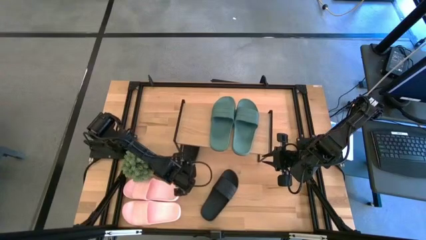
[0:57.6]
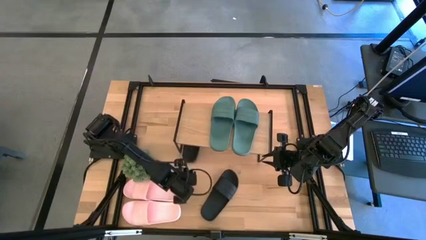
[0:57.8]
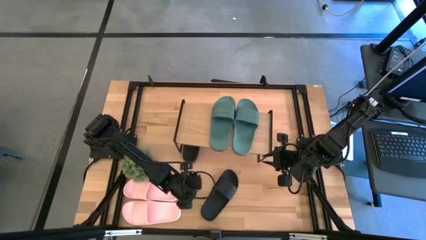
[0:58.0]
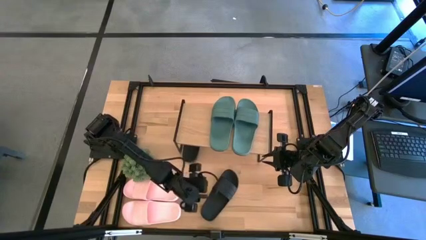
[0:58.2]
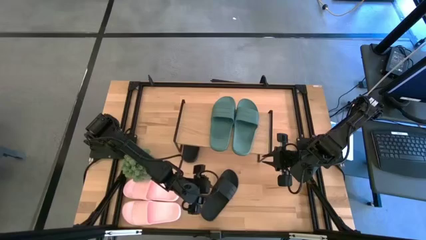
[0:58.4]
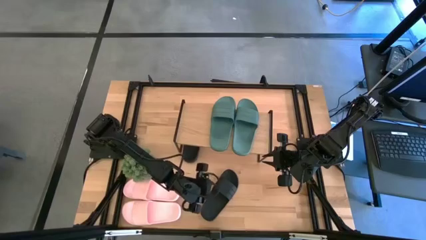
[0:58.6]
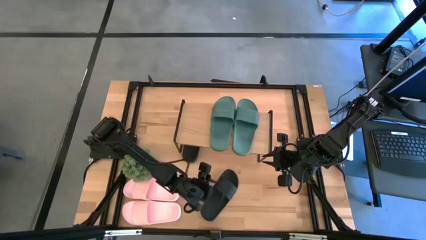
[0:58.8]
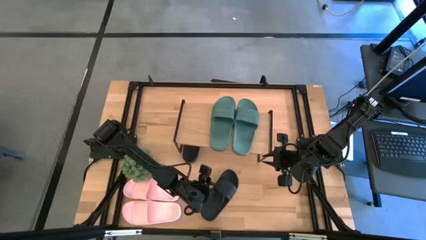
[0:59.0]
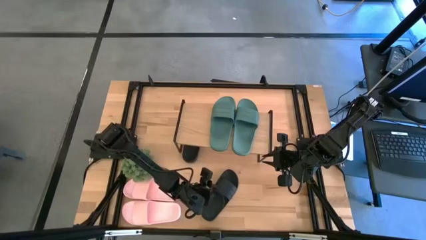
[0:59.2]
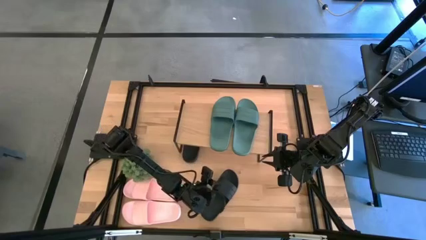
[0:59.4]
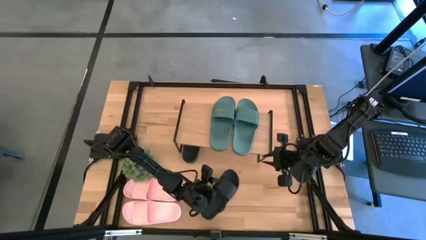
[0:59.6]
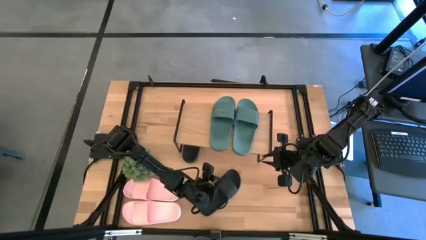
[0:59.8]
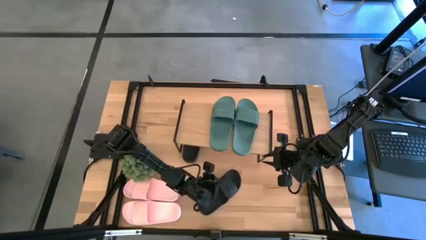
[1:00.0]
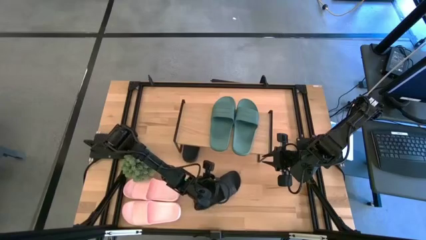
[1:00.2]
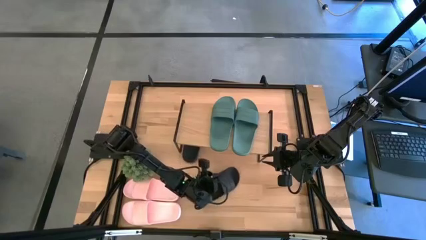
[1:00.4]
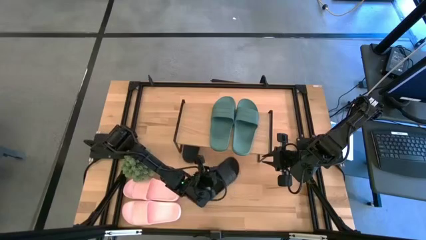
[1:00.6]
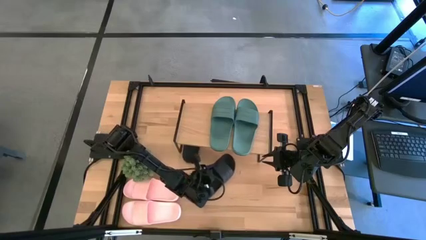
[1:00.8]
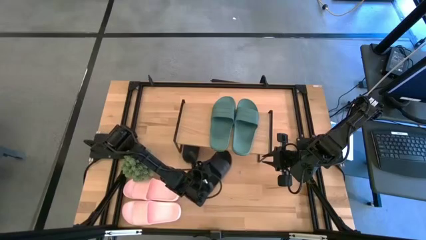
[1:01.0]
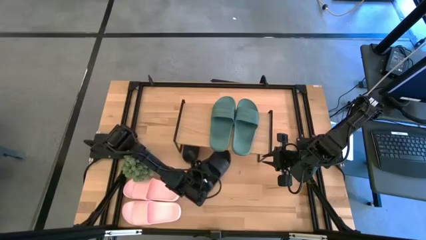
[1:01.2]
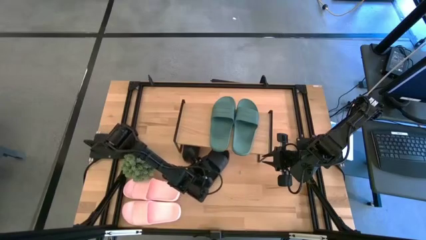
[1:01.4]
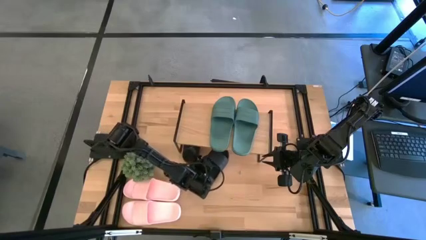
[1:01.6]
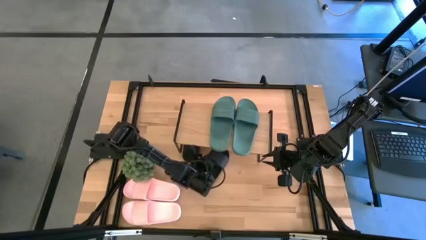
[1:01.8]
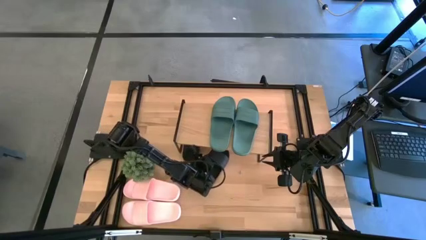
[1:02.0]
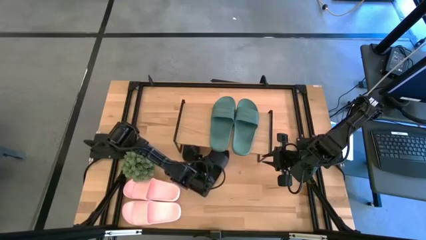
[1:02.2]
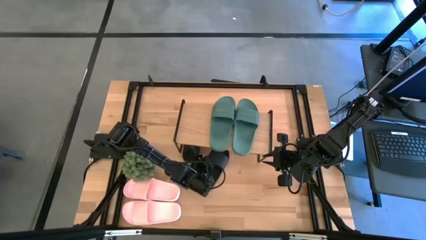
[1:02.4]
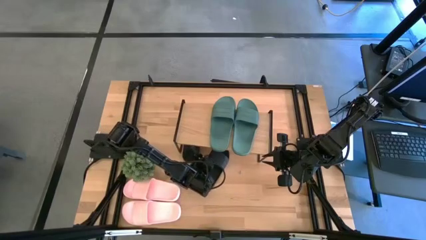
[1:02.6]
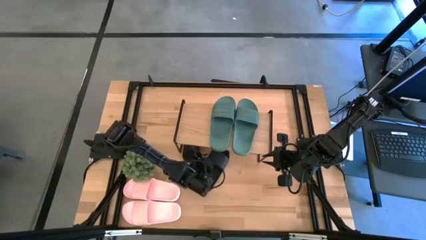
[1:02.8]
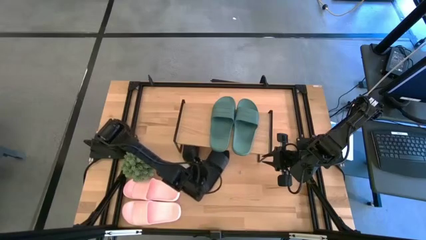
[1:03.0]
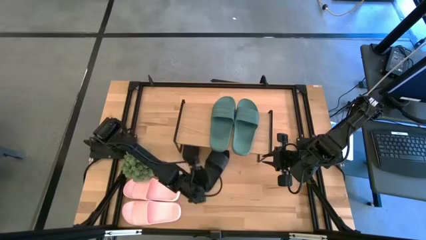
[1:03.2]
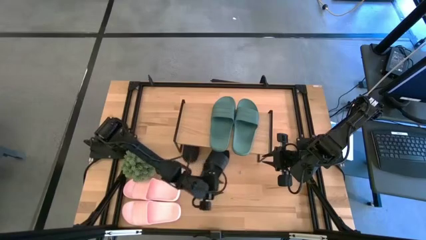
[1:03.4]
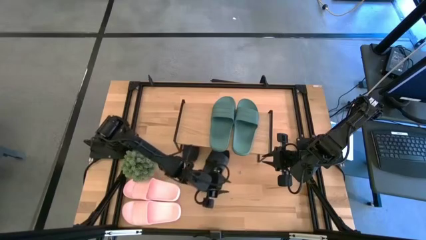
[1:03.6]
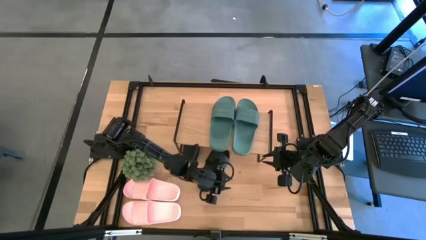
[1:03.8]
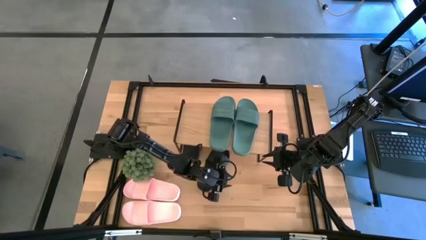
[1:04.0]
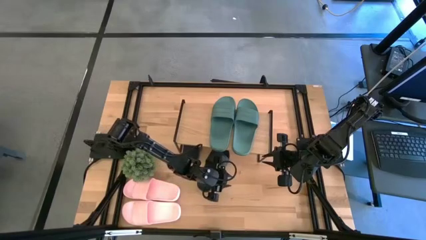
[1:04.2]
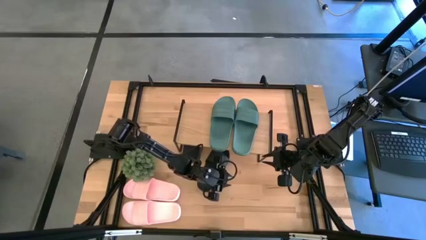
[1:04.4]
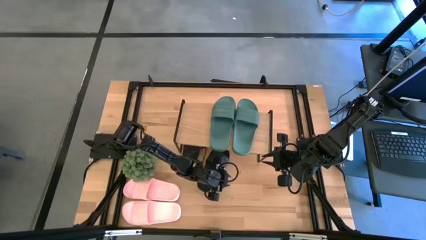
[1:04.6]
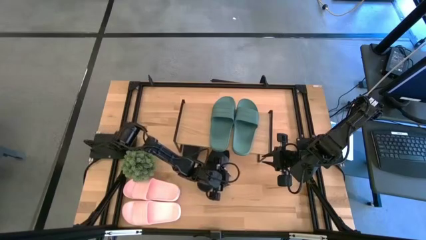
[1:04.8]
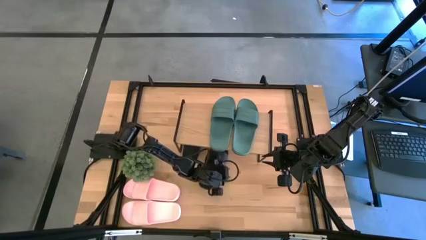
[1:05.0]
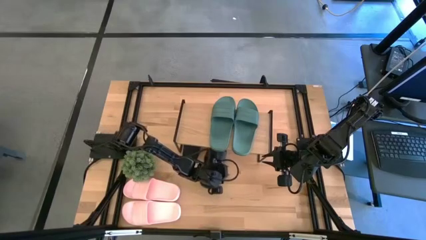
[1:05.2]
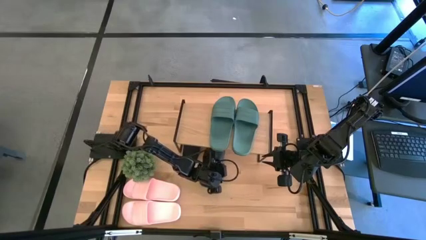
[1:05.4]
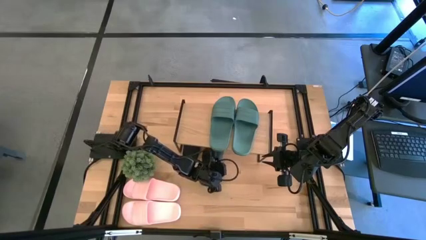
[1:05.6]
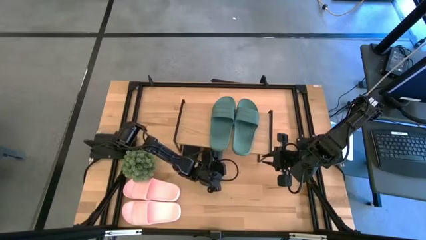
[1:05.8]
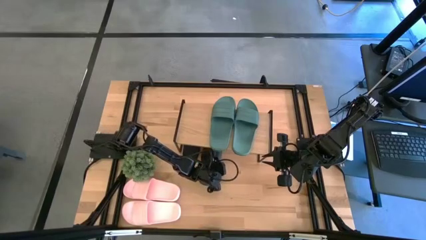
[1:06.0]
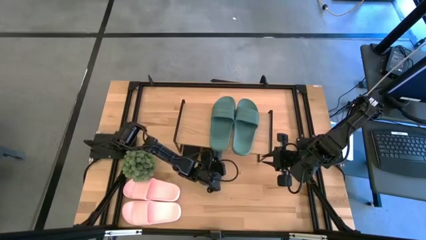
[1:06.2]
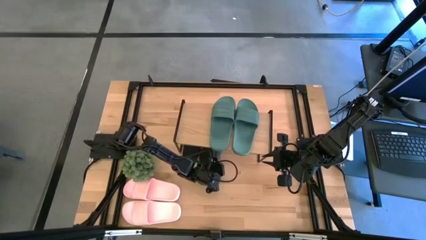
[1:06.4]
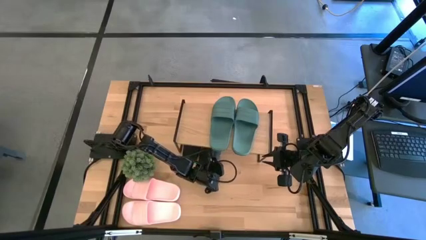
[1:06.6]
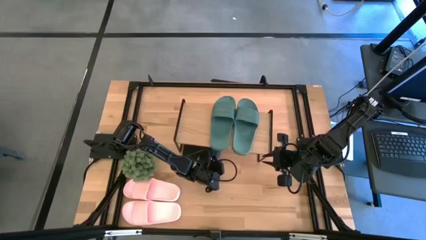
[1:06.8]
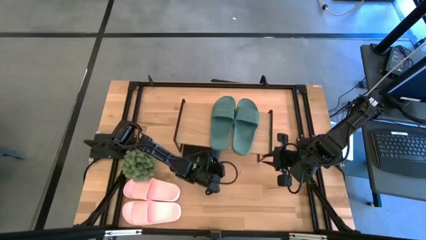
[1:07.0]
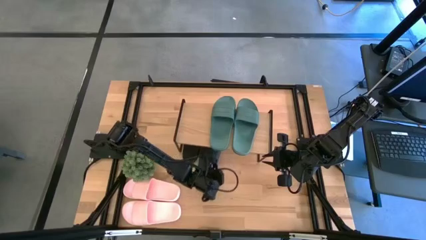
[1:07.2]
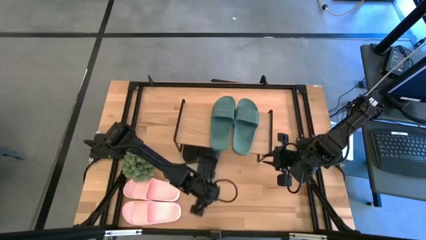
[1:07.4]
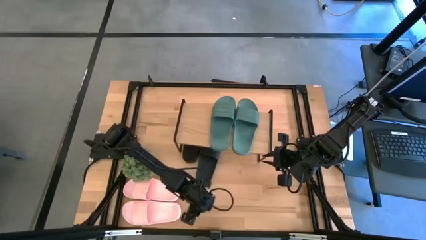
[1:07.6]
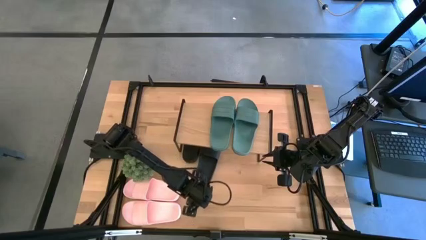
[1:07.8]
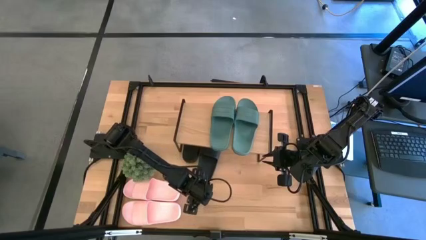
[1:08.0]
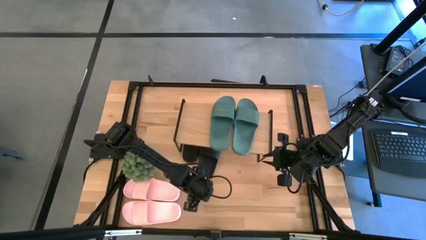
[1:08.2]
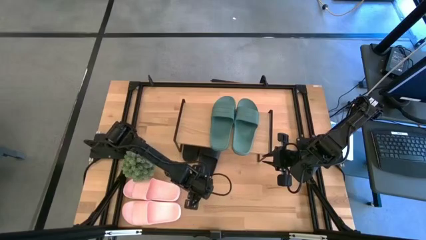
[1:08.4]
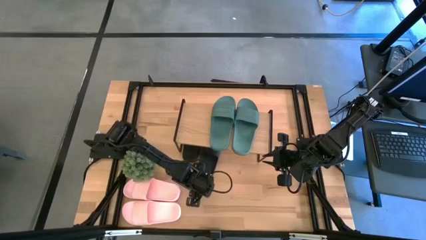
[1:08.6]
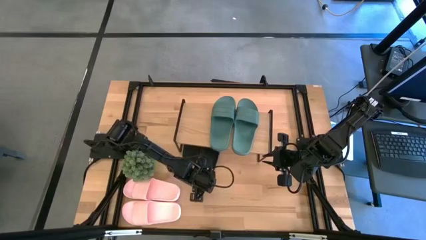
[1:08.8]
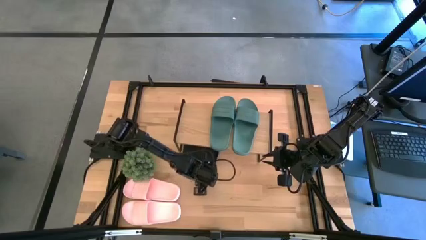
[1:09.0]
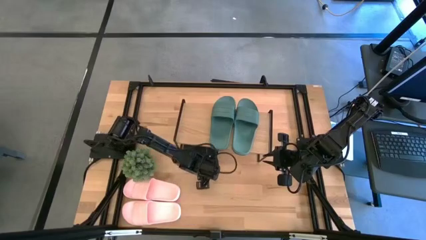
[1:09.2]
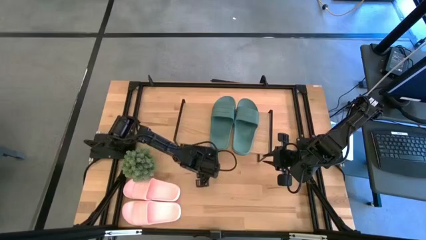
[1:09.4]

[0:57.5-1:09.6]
Task: Pick and place slides into the shelf
Put the black slipper under the shelf

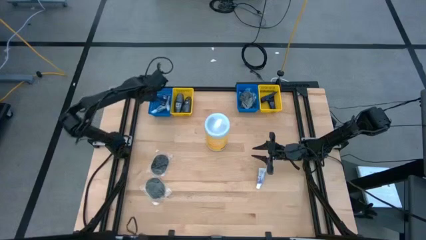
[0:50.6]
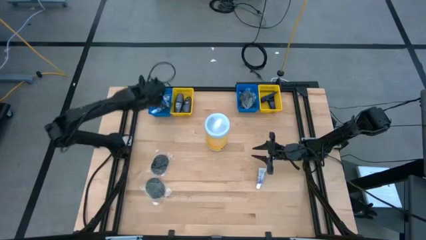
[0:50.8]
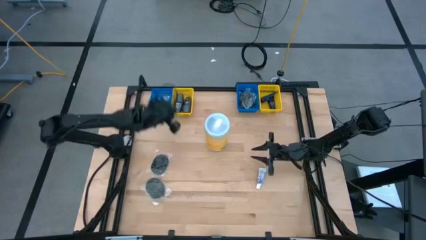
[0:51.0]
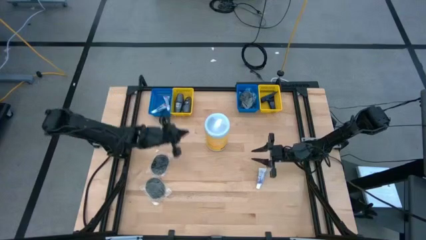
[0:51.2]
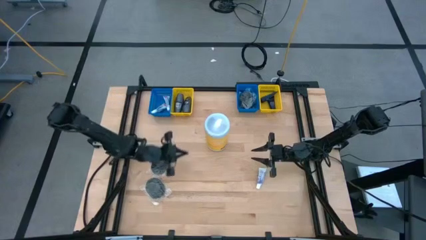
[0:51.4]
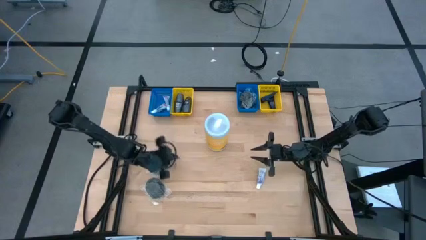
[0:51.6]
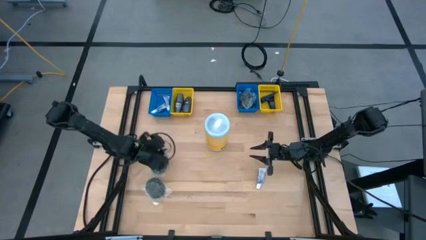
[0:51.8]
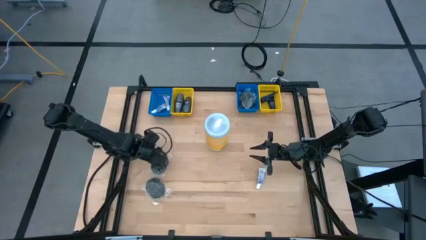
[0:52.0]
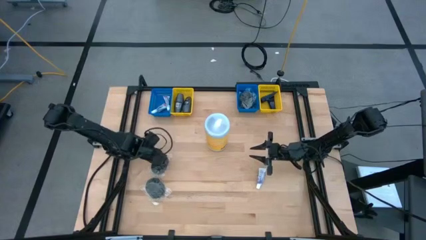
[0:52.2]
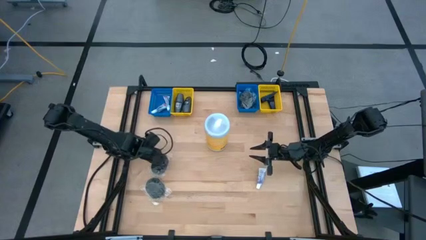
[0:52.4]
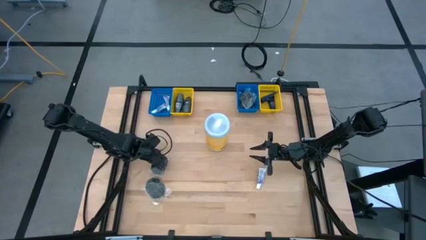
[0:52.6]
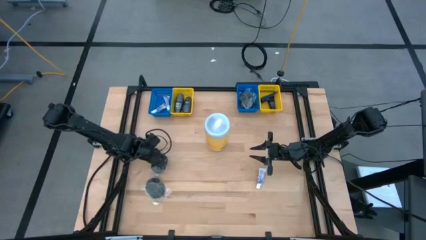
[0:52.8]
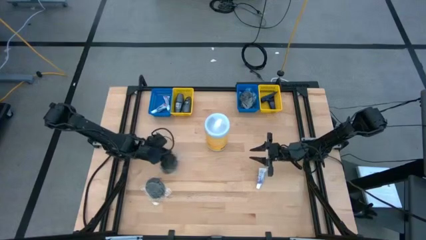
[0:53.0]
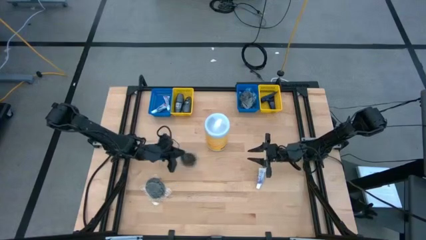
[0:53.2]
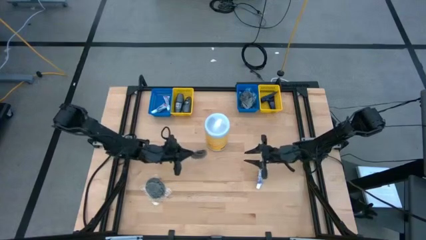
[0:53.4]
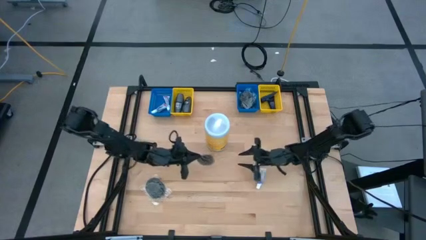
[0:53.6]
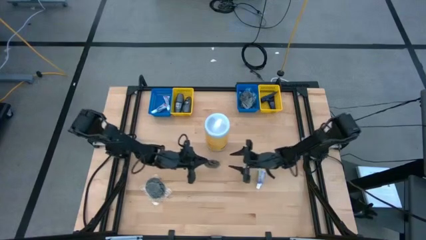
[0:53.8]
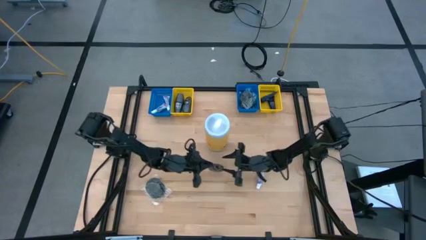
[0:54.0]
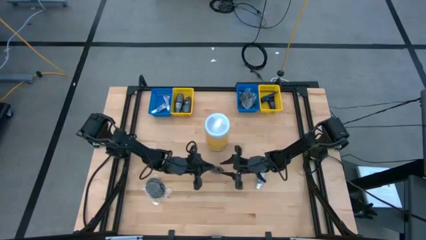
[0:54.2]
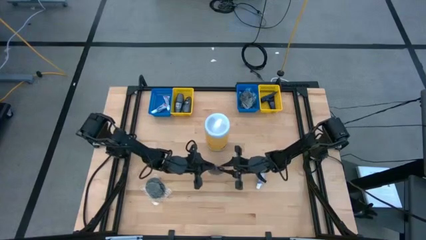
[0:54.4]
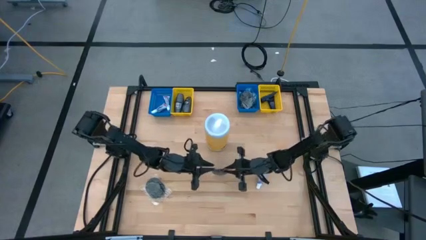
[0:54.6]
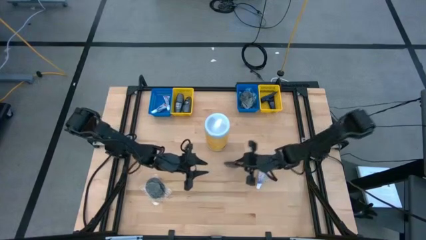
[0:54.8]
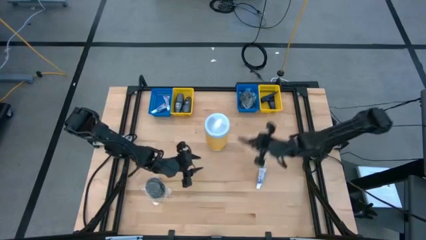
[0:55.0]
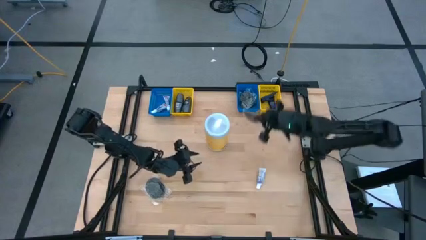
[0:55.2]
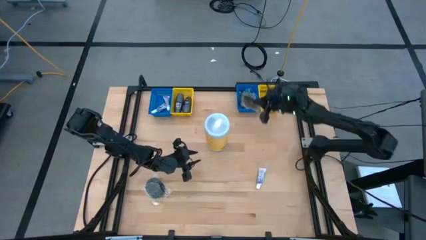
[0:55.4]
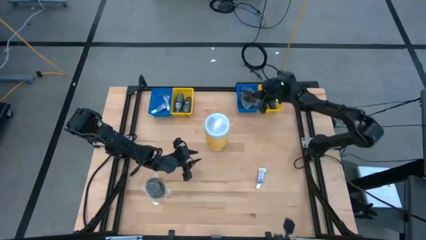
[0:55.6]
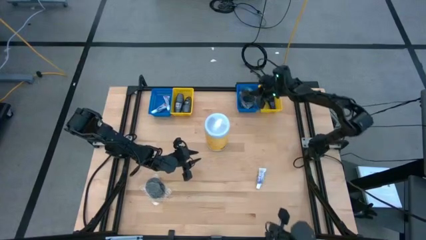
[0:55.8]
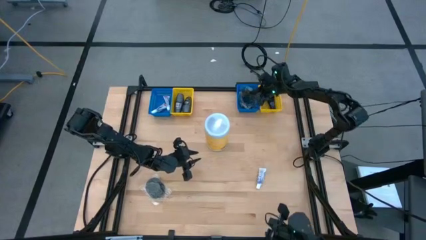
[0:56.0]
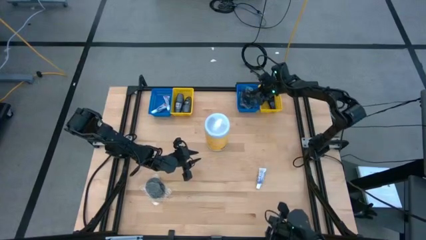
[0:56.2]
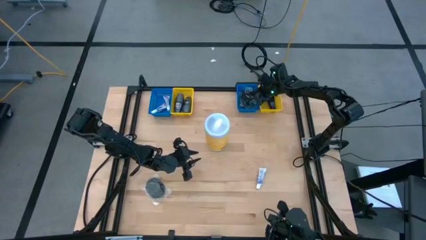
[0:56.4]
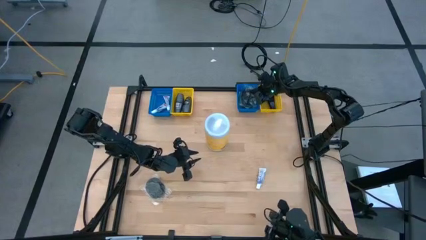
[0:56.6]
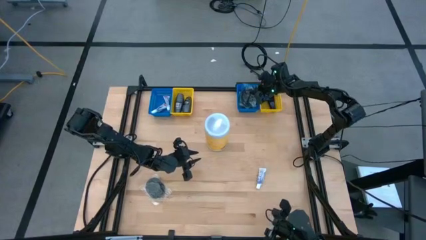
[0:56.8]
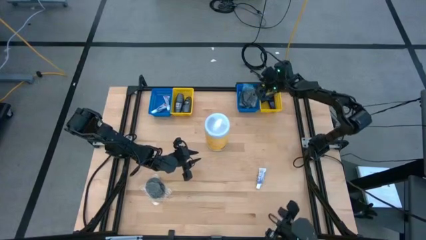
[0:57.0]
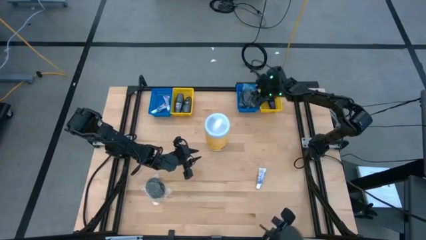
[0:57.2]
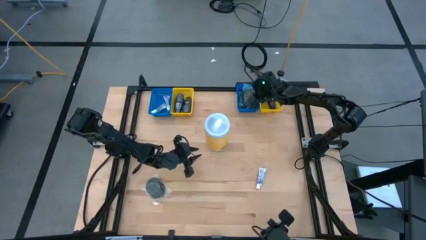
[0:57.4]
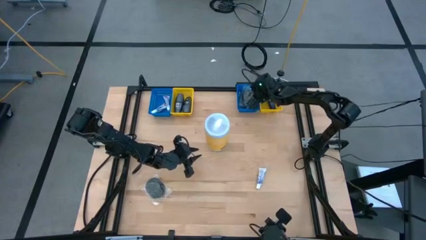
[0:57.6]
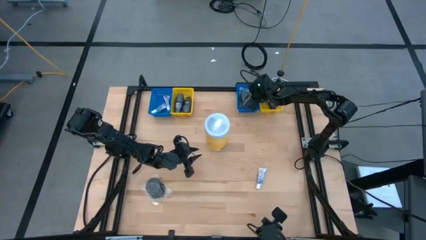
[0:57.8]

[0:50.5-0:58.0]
Task: Pick & Place Travel size toiletries
Put the top hairbrush into the right blue bin
